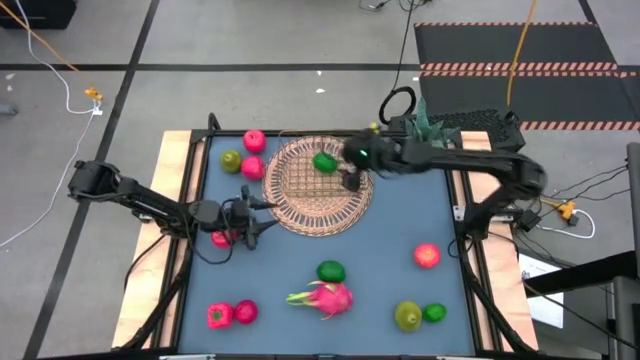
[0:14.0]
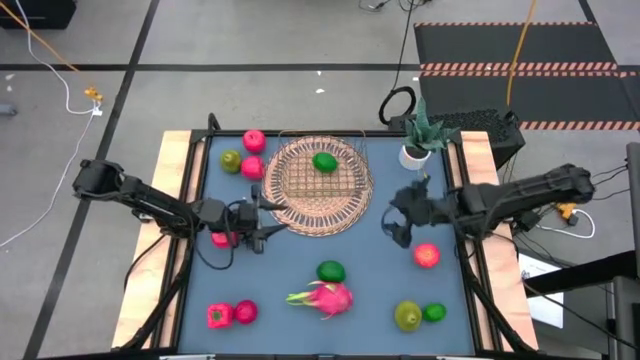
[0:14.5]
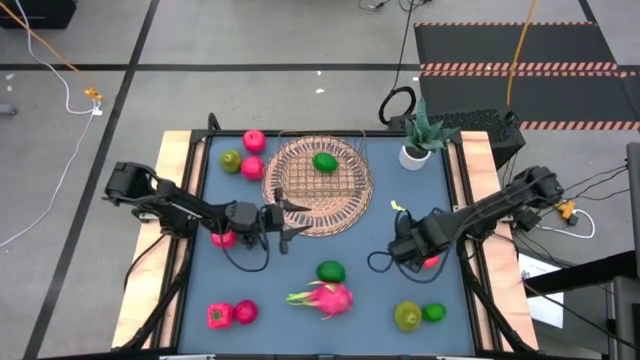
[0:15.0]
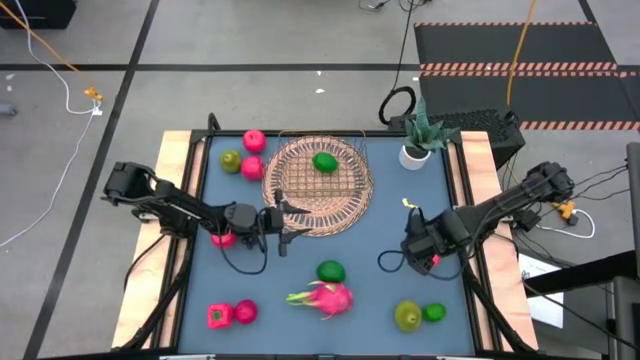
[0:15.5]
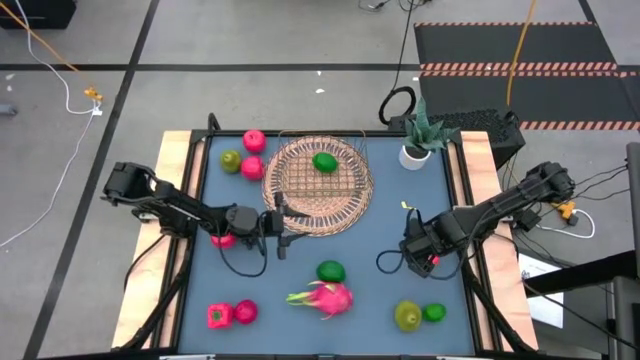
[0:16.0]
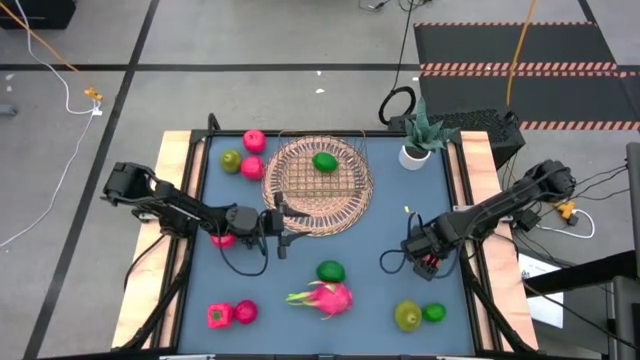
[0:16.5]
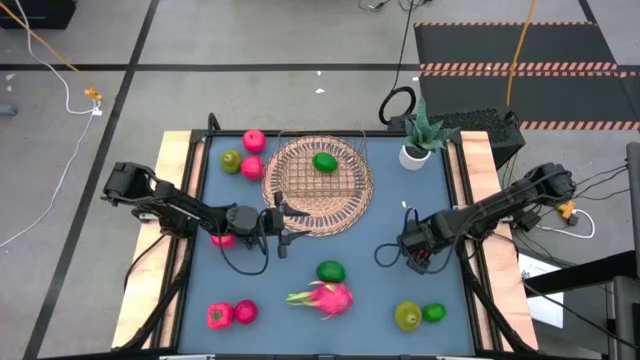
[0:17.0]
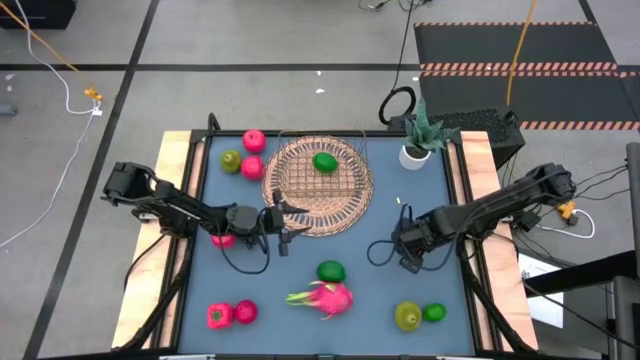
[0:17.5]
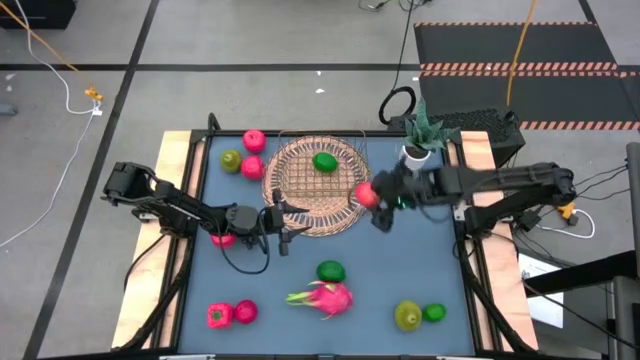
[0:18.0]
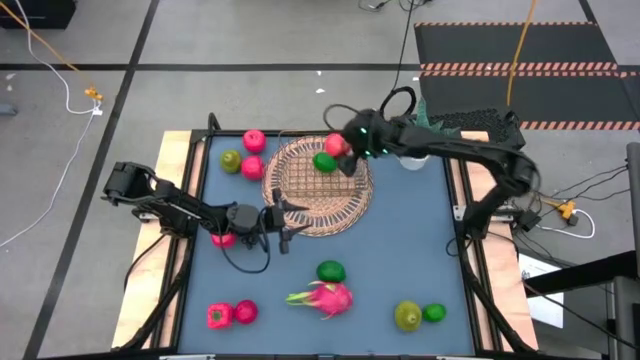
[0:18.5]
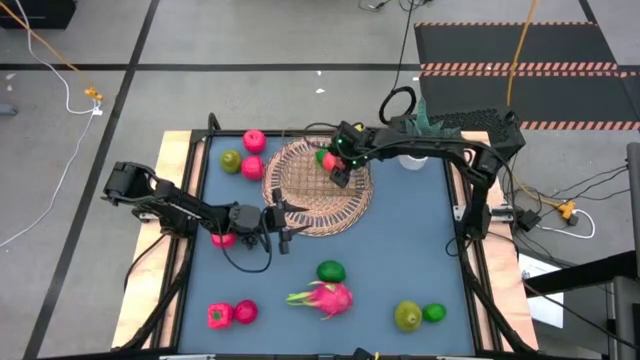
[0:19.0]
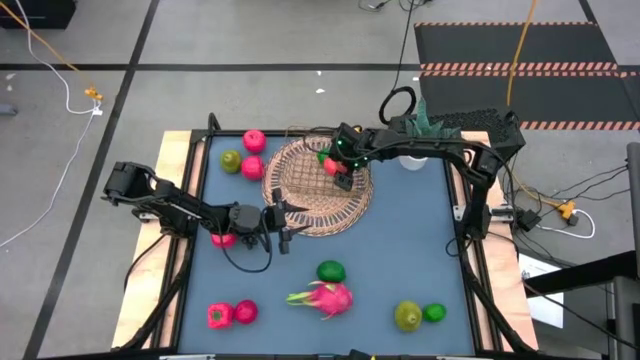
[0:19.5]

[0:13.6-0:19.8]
Task: Build produce basket
Put the apple into the gold wire basket

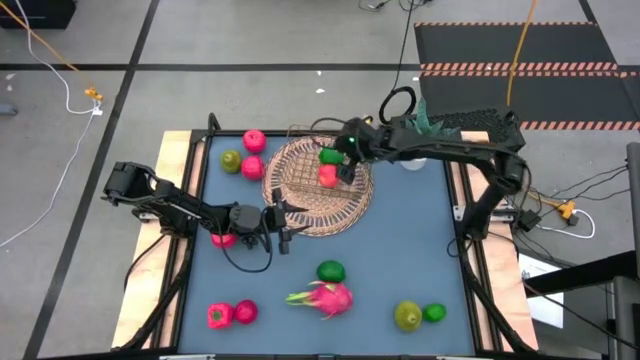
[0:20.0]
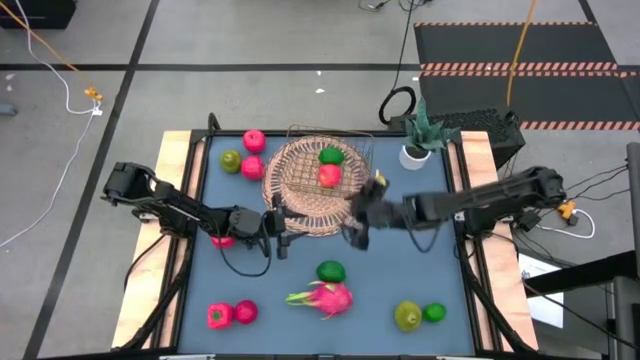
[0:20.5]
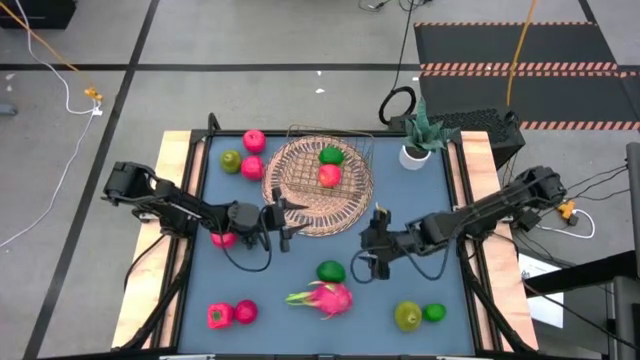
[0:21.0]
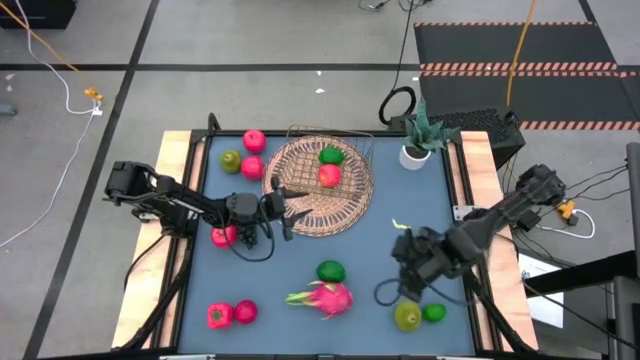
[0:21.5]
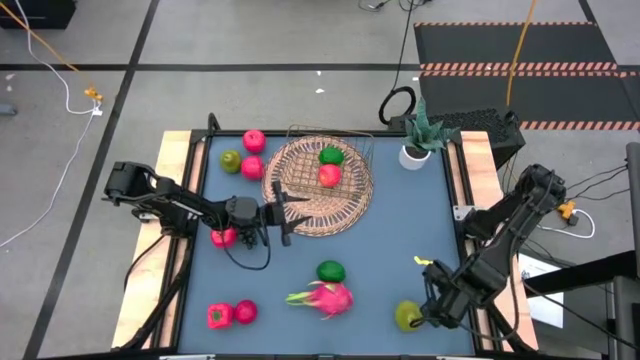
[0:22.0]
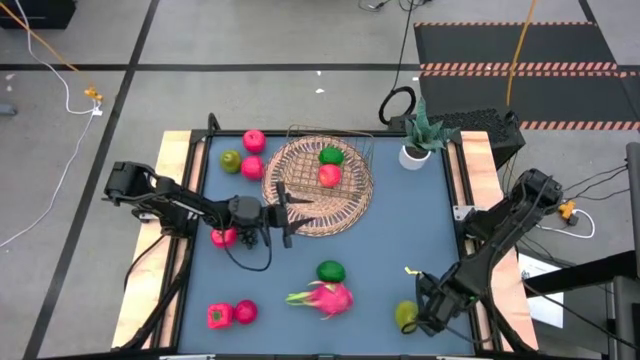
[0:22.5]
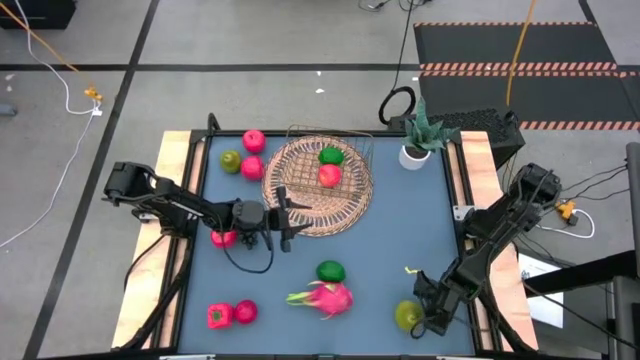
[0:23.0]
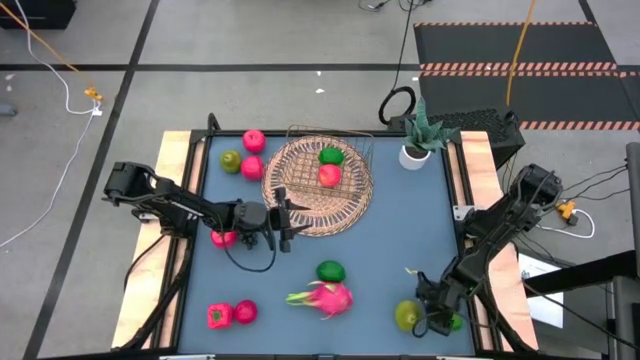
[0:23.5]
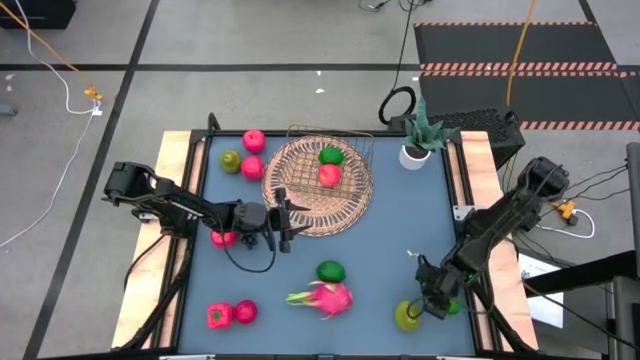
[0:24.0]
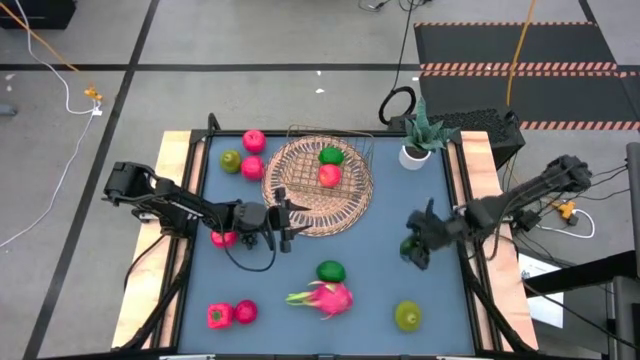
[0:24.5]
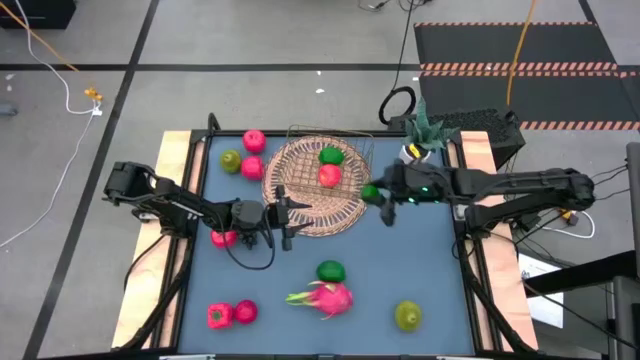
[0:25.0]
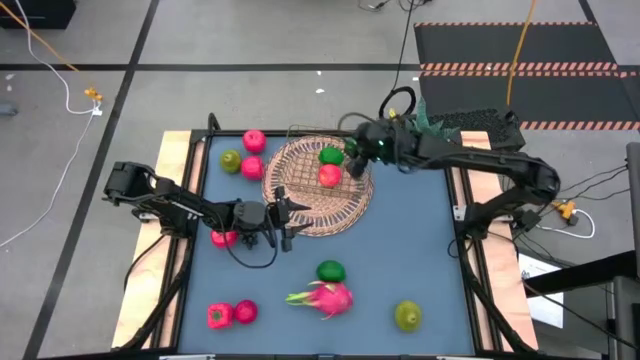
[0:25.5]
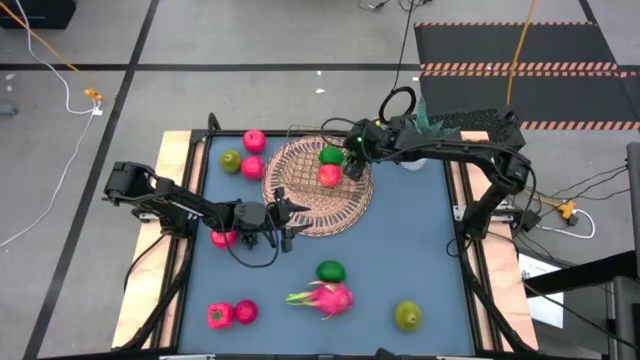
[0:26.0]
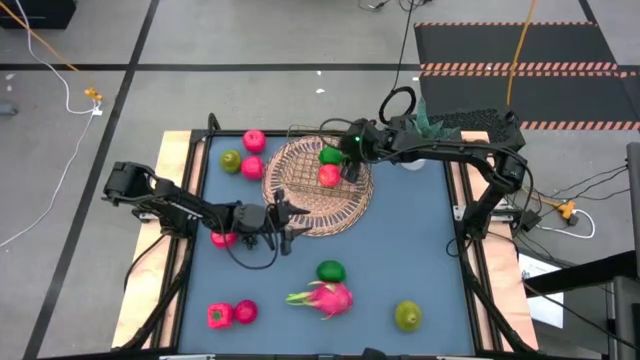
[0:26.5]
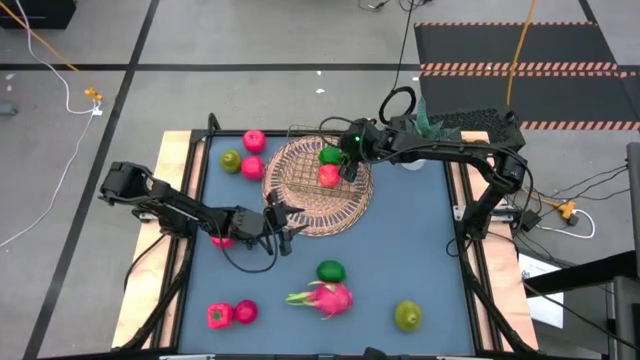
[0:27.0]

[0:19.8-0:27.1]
Put the lime into the gold wire basket

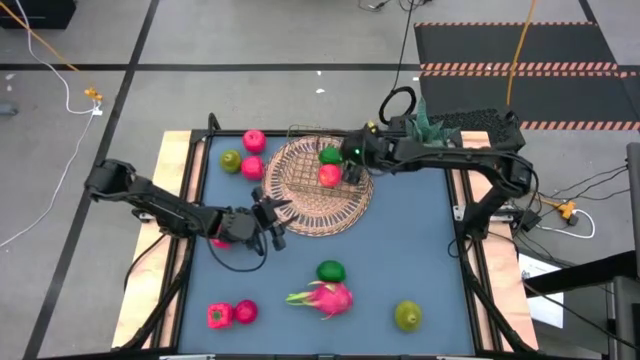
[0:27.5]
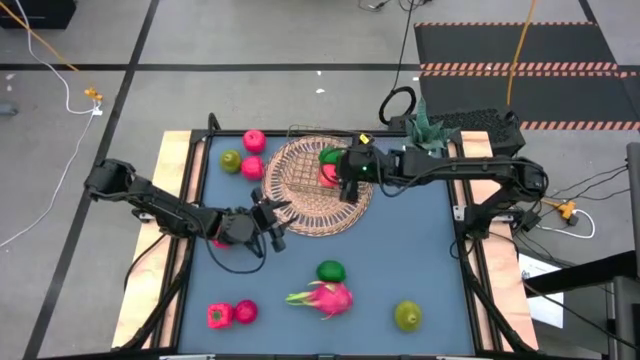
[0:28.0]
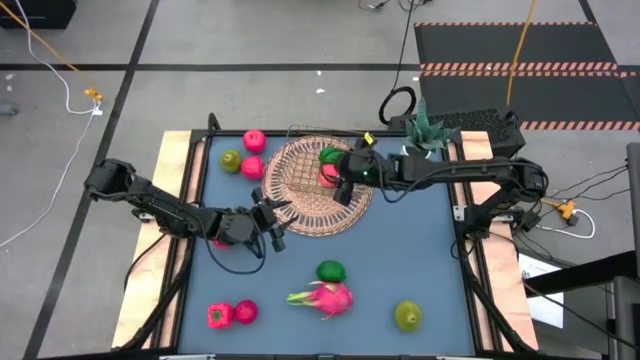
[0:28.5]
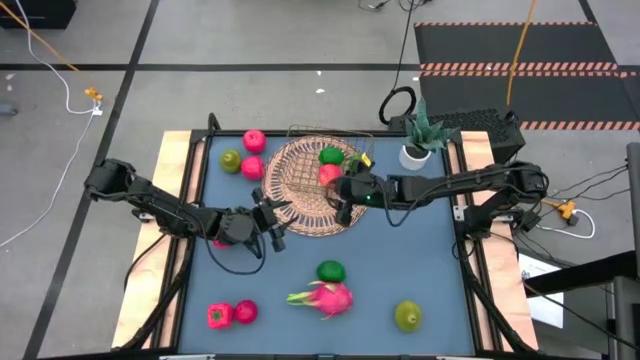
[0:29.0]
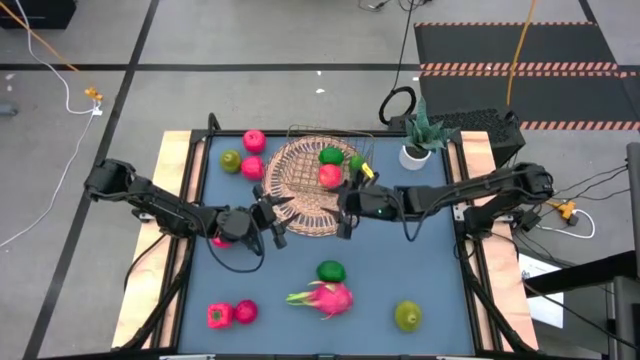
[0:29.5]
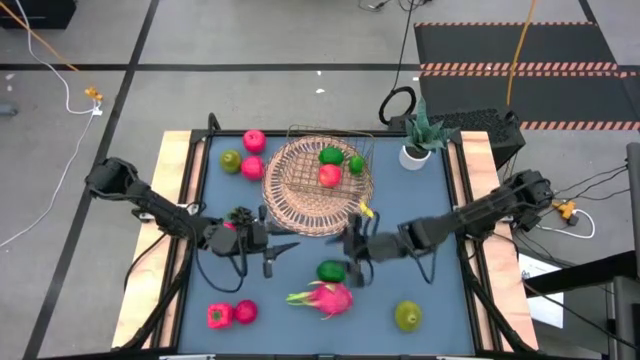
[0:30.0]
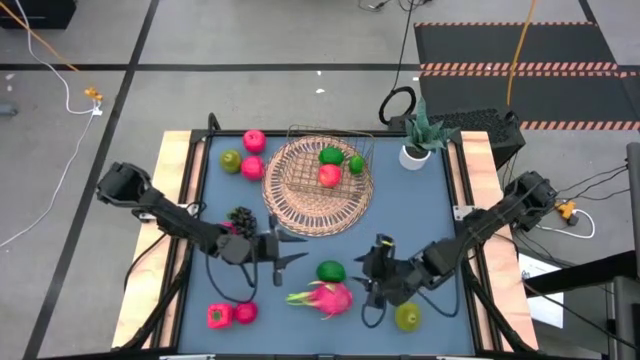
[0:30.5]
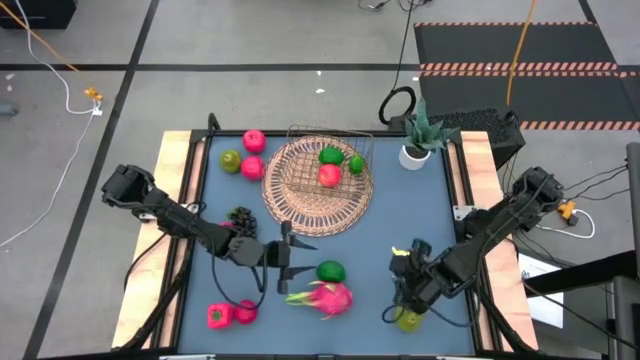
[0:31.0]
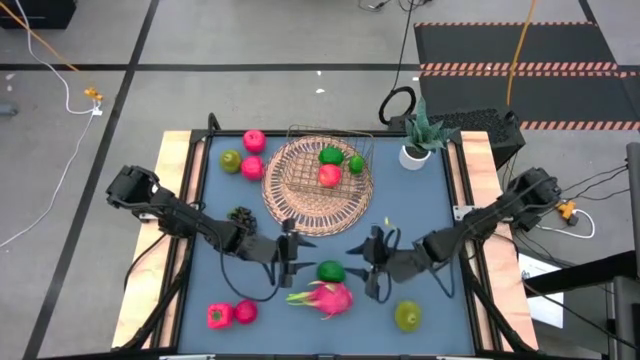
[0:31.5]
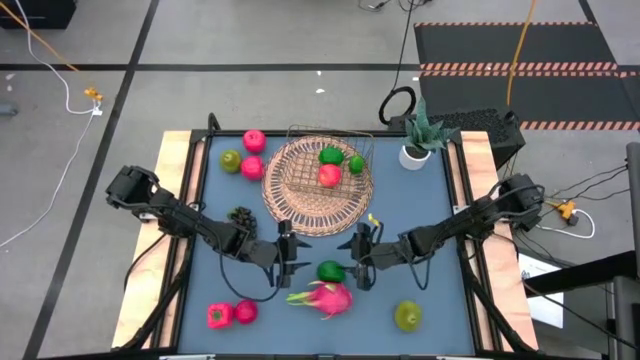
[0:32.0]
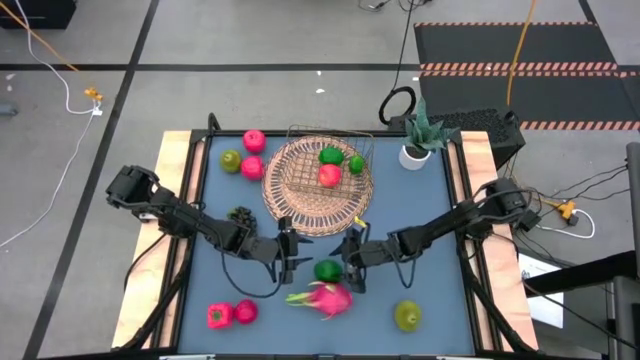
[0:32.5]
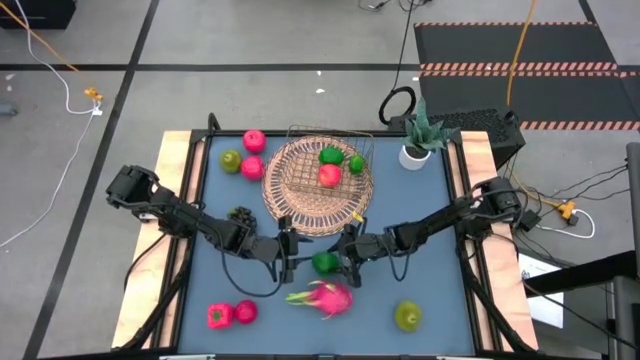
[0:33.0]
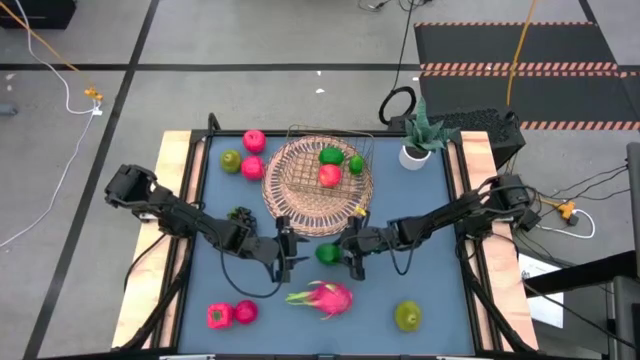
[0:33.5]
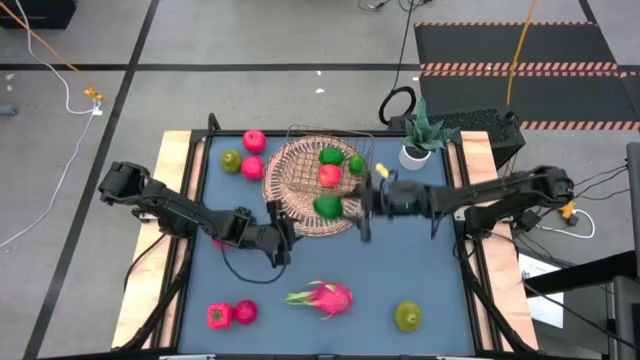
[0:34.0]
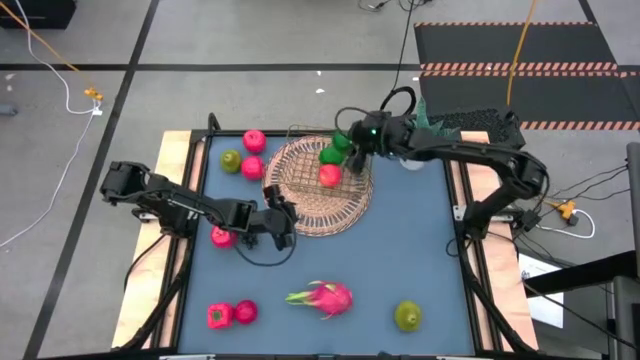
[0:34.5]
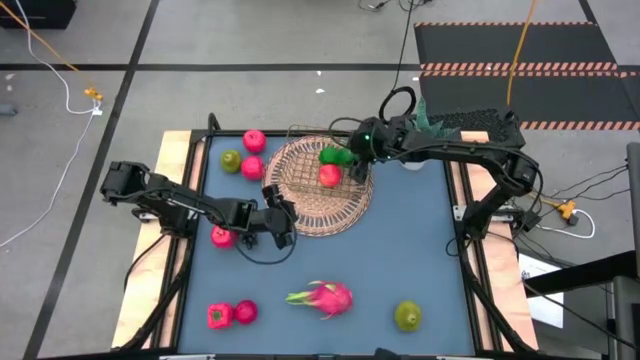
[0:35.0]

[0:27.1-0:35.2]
Put the lime into the gold wire basket
